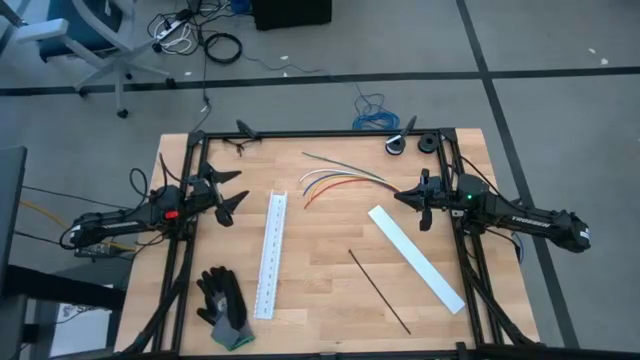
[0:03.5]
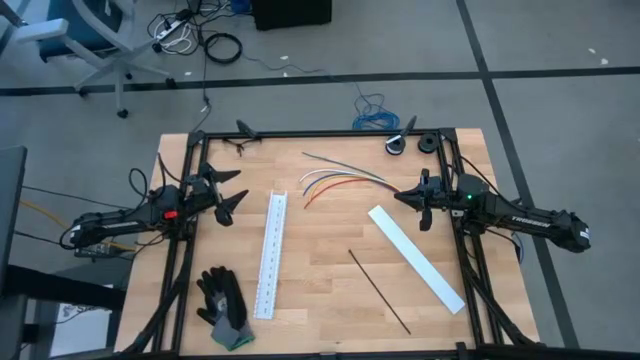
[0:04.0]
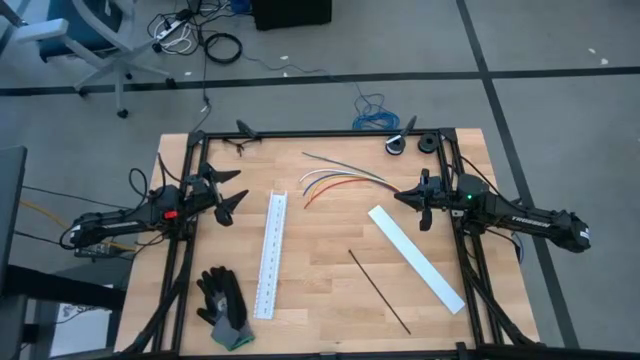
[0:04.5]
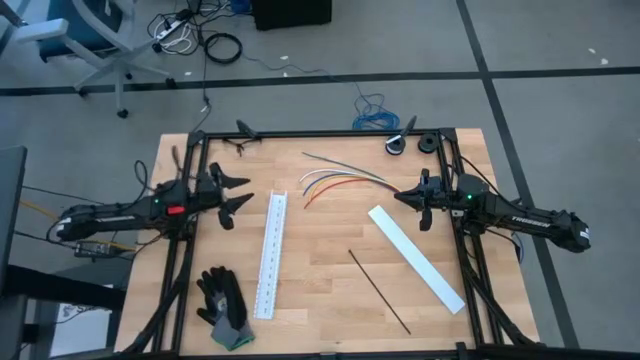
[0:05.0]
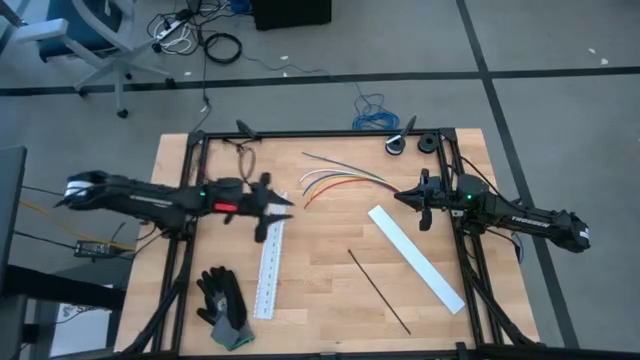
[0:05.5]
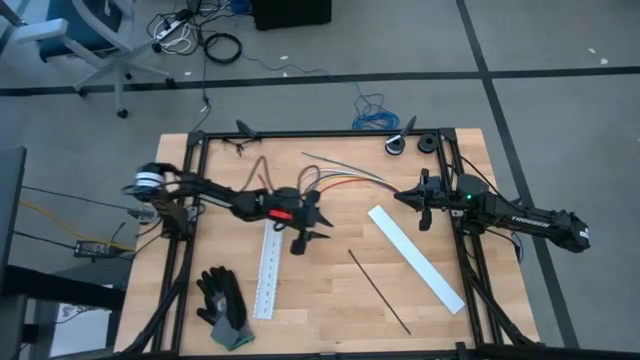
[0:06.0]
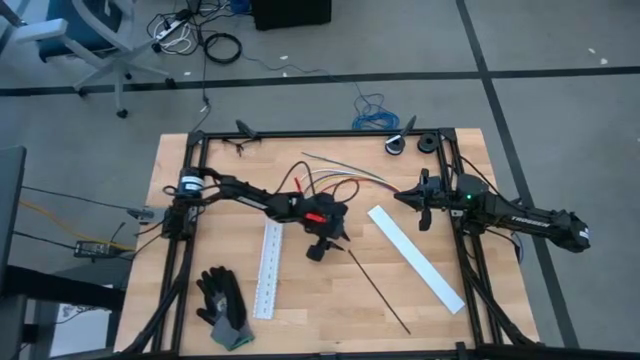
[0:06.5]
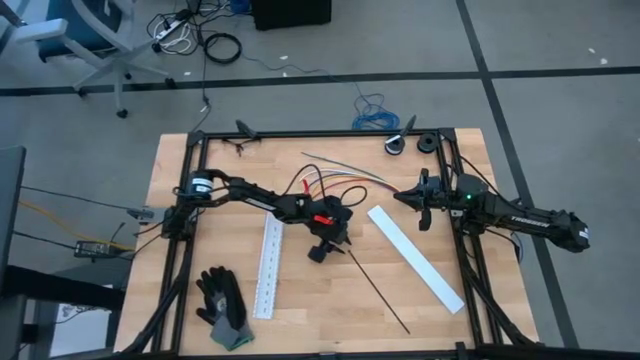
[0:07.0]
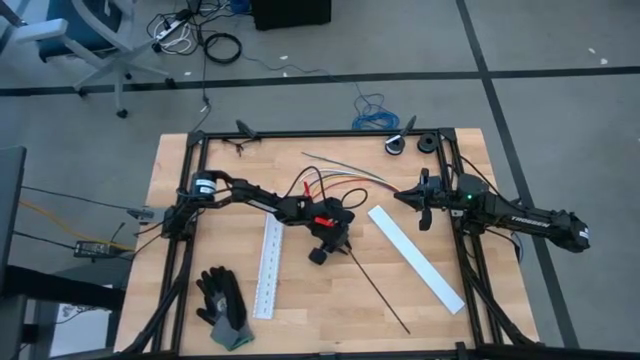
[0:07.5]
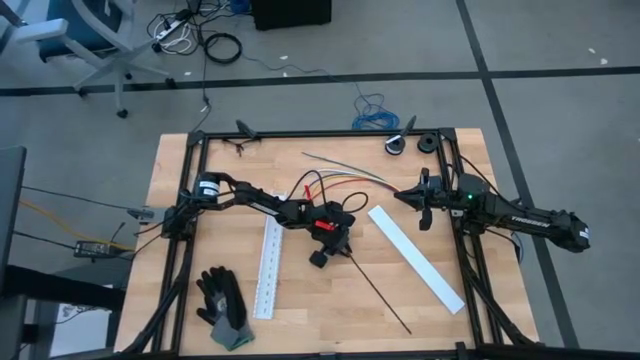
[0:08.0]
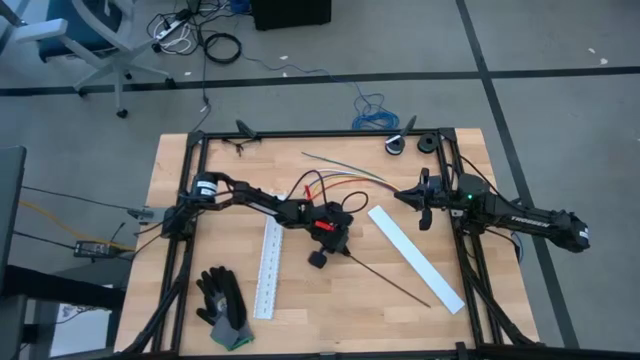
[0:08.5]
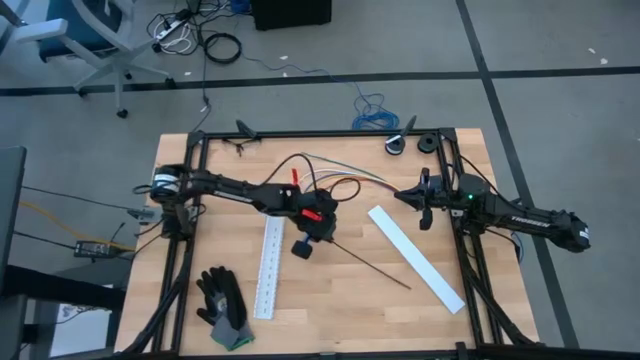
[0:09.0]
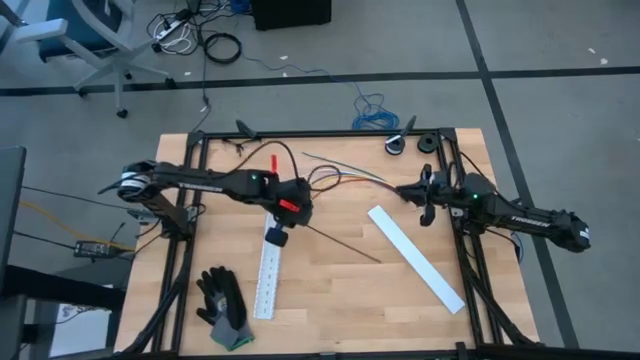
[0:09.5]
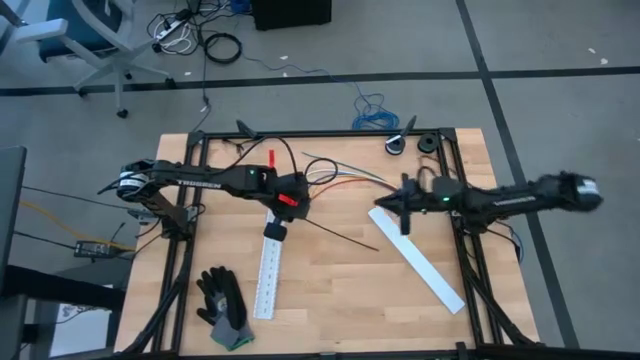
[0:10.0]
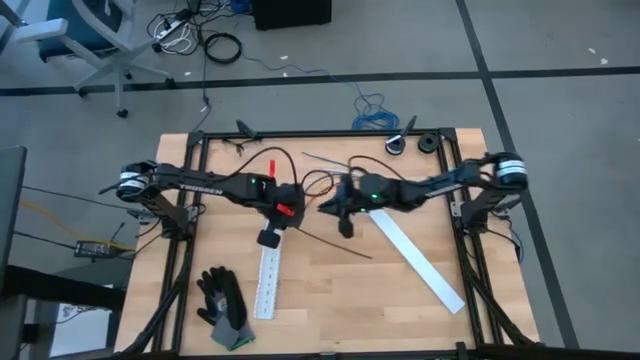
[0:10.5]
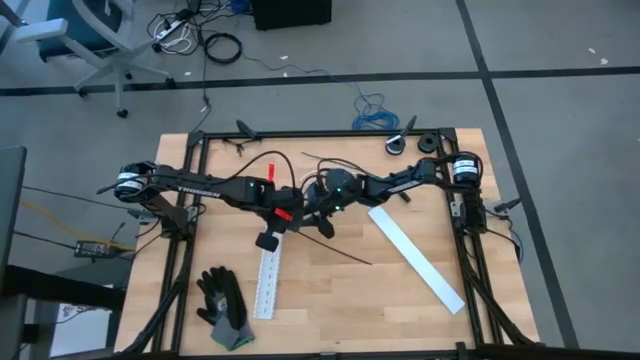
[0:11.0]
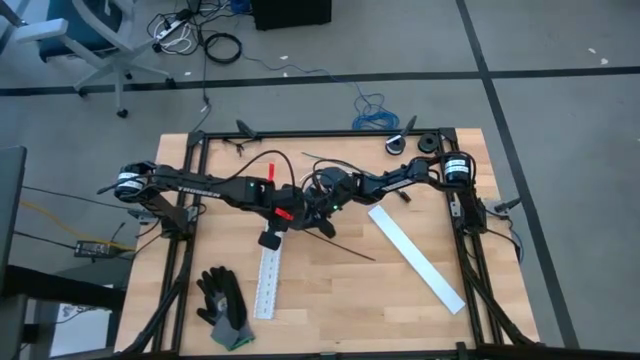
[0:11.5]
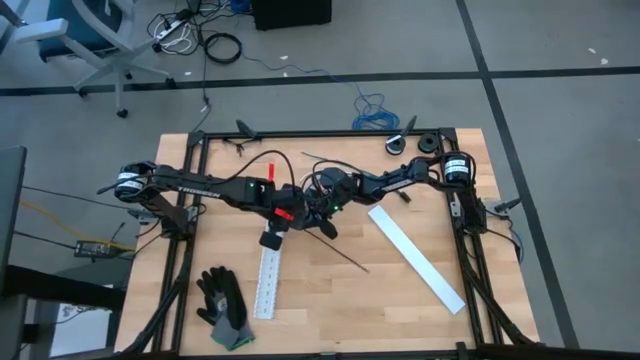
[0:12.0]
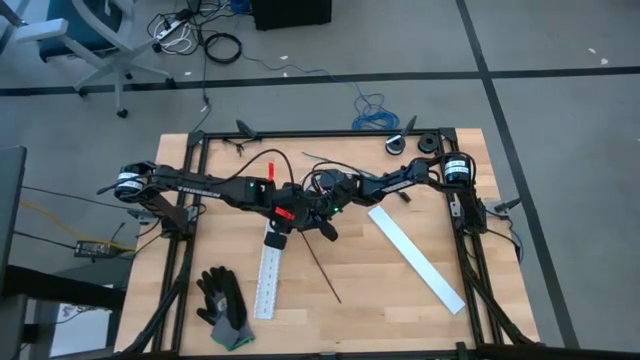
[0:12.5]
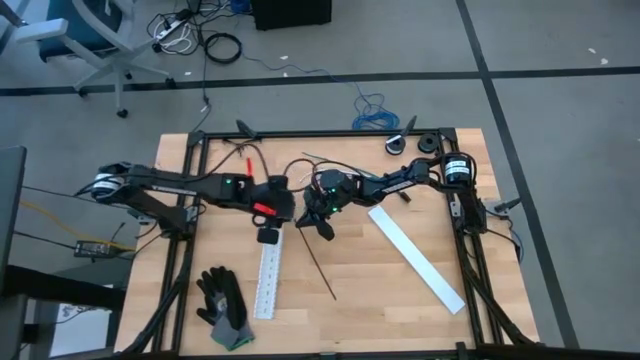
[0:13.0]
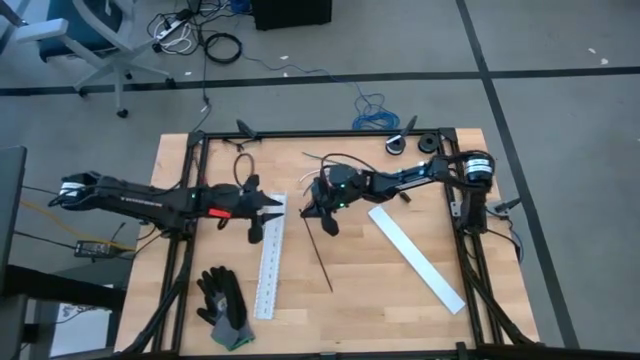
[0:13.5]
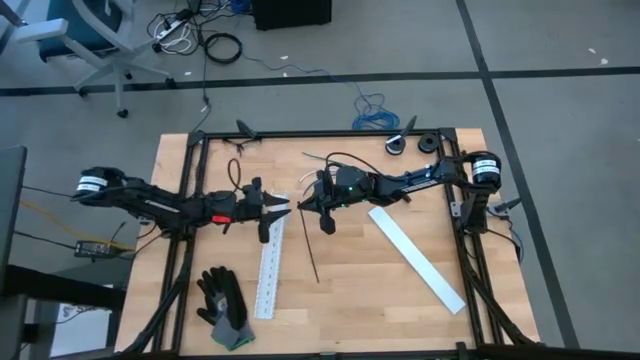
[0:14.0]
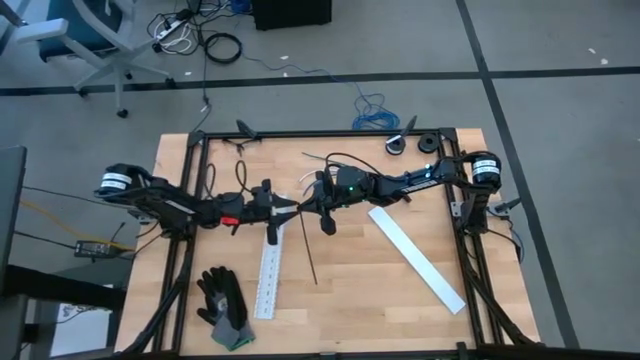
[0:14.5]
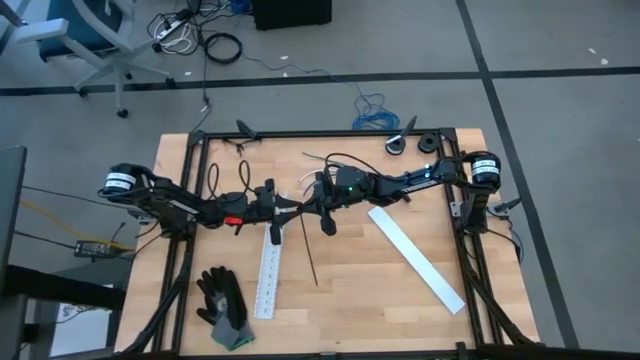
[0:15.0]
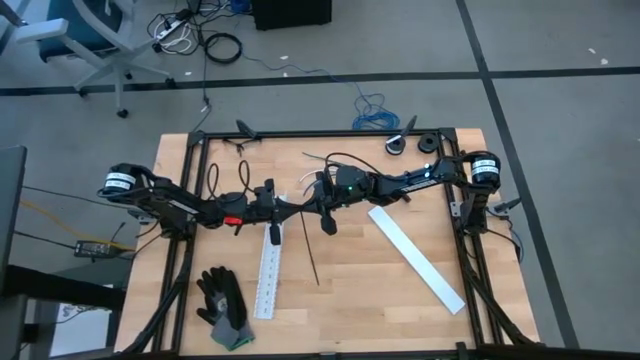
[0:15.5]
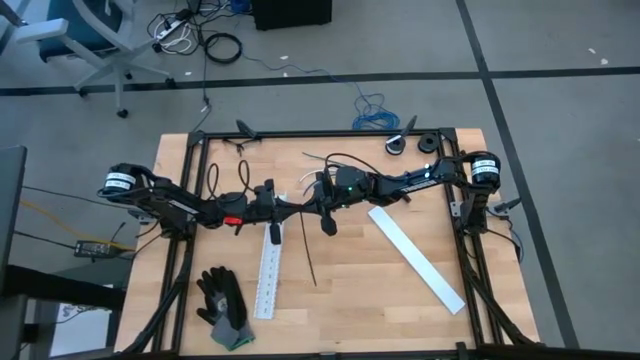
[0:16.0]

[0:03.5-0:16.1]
Task: Ziptie cables
Insert the black zip tie into the locking head

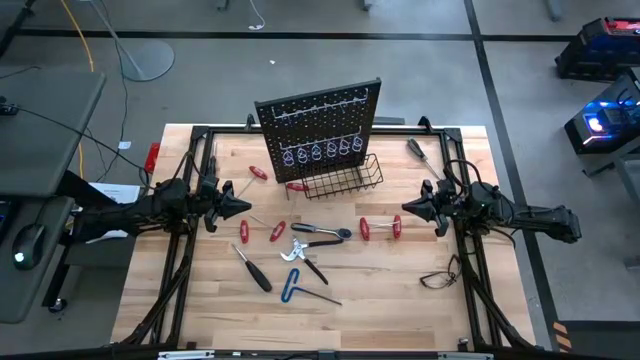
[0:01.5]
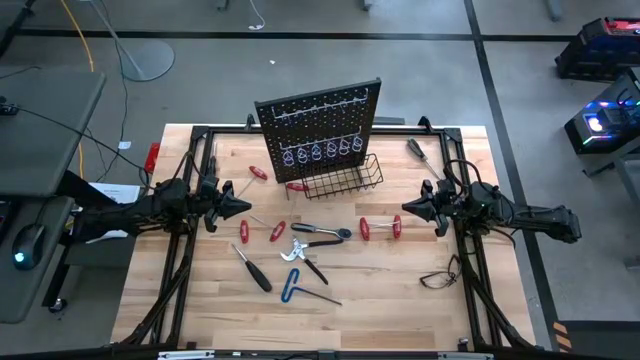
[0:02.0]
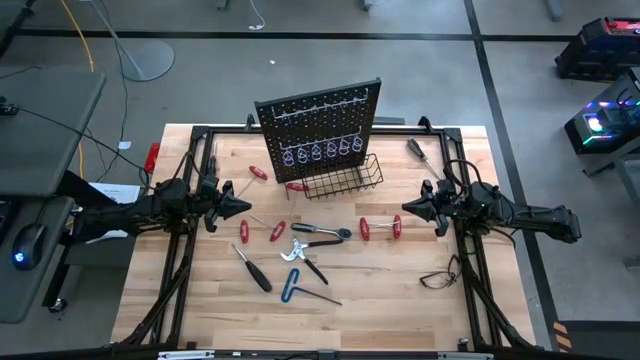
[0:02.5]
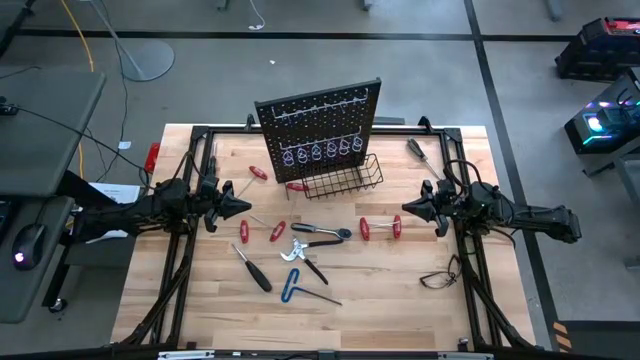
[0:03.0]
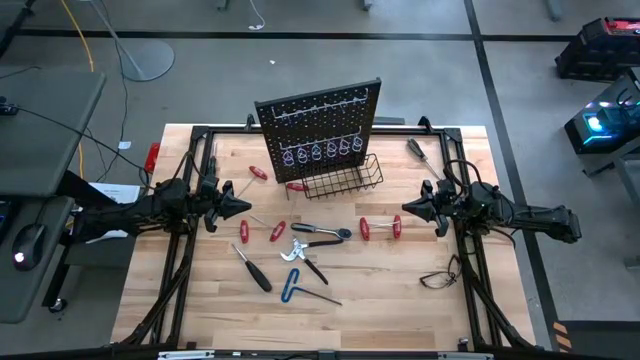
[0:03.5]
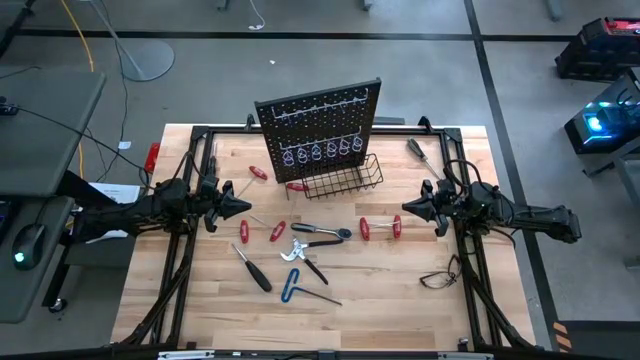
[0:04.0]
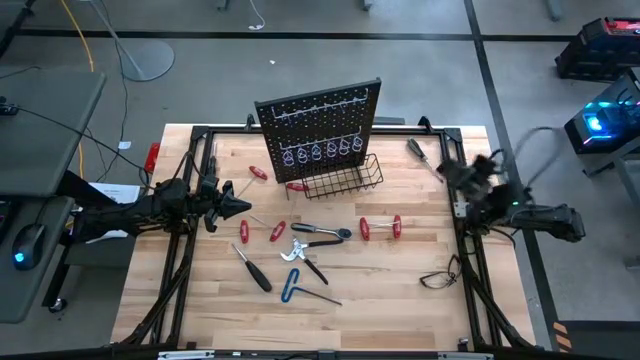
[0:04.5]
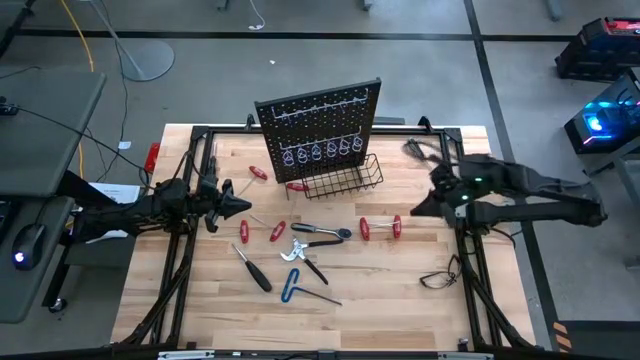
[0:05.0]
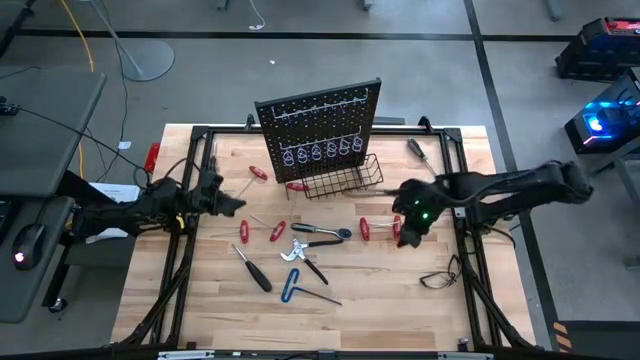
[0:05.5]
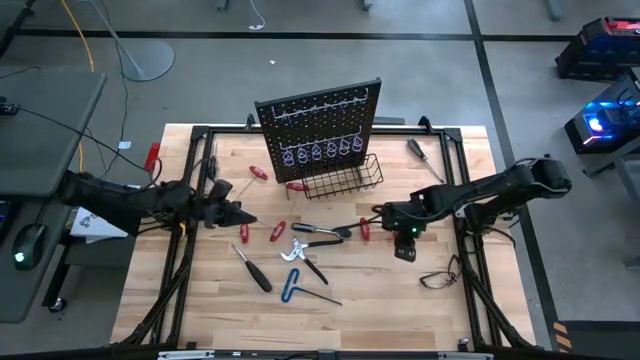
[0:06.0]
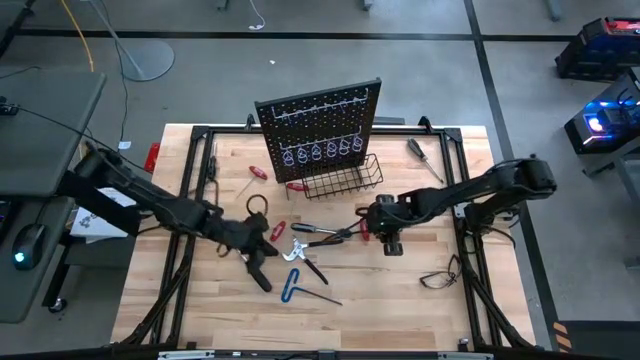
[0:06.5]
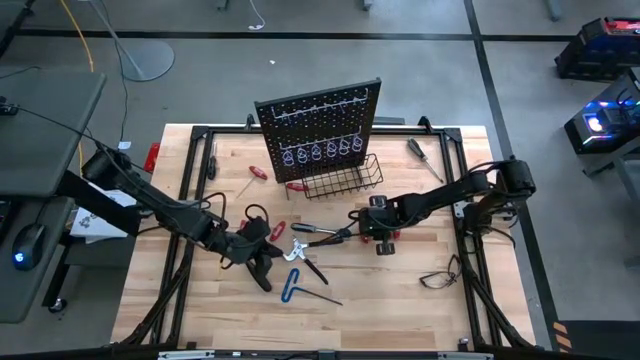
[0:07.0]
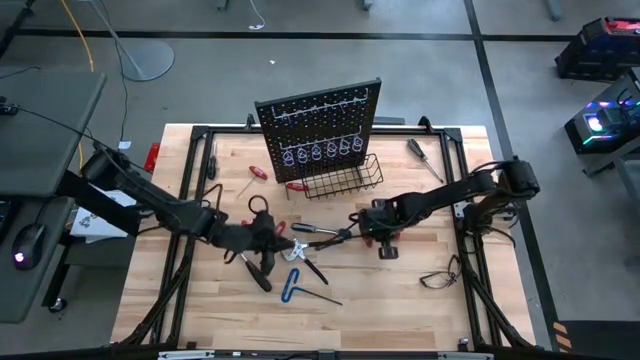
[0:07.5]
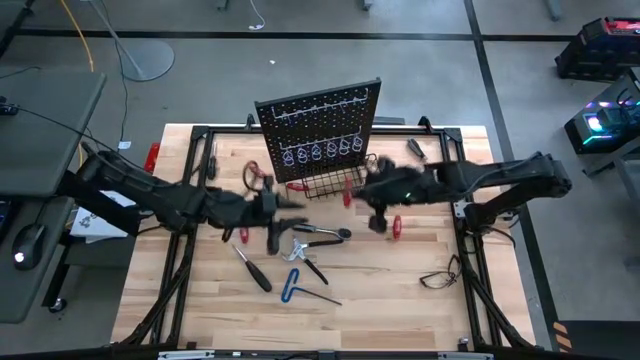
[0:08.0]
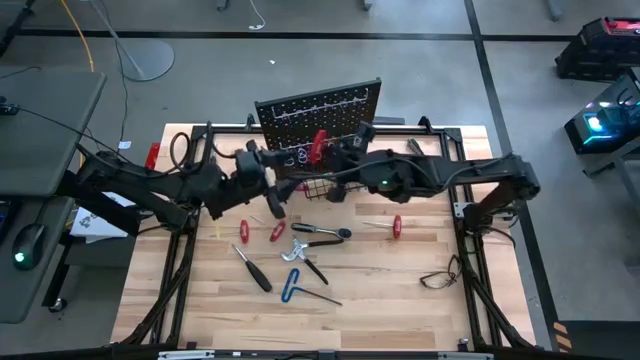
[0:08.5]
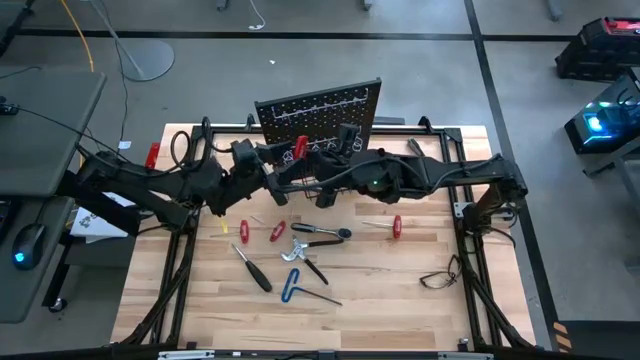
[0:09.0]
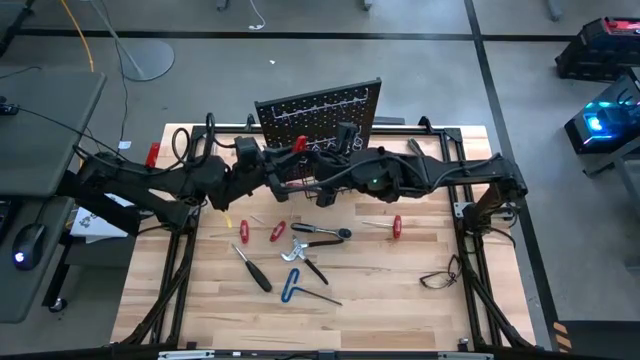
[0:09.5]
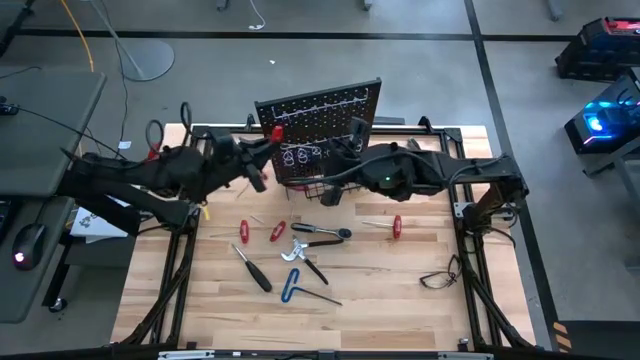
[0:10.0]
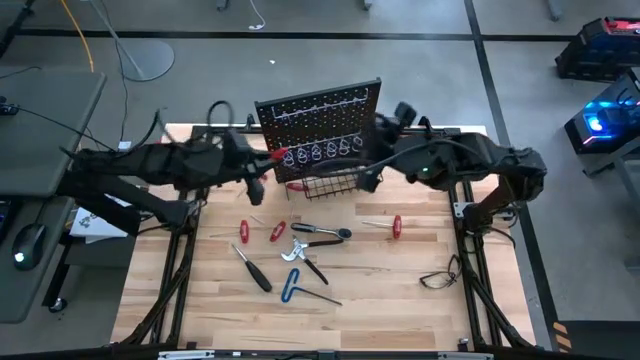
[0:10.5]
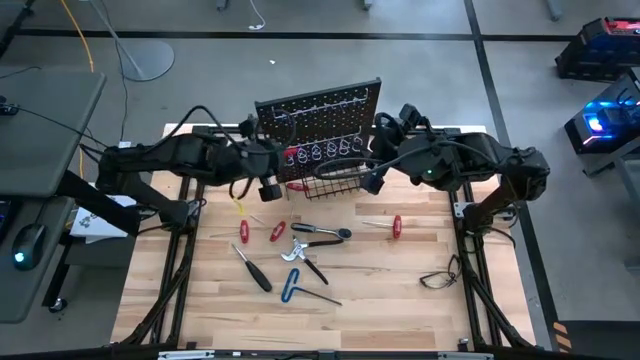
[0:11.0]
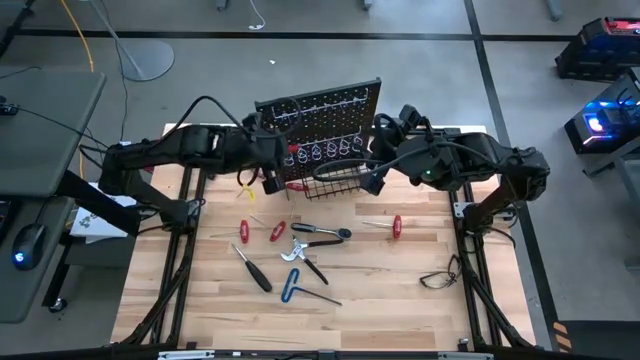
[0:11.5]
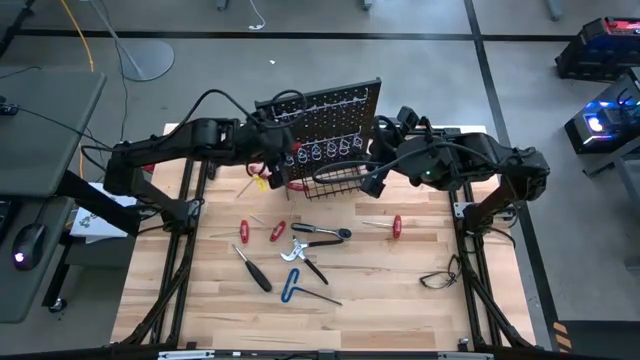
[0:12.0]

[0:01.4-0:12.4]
Task: Hang tools onto peg board
Hang the red allen wrench on the peg board
